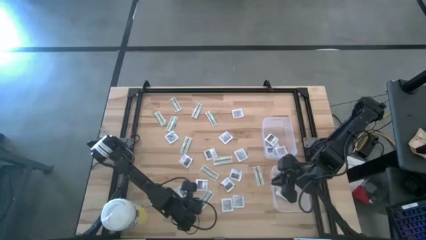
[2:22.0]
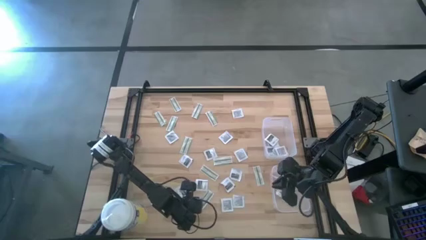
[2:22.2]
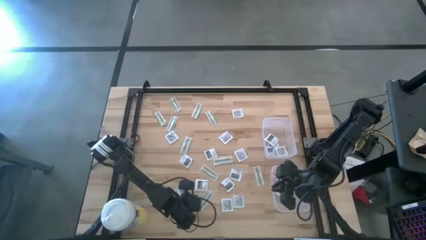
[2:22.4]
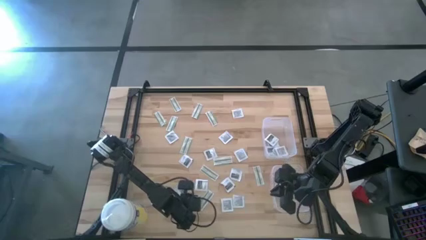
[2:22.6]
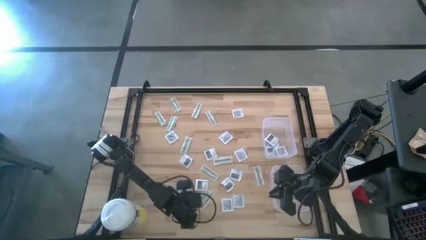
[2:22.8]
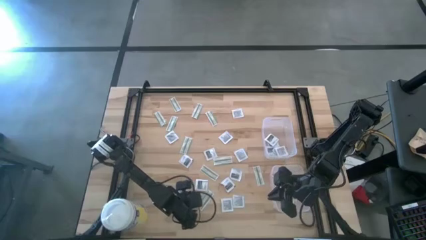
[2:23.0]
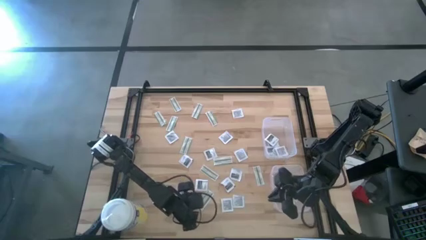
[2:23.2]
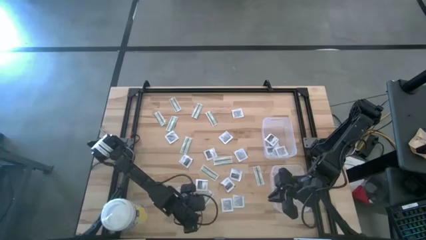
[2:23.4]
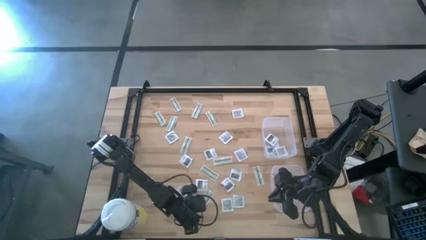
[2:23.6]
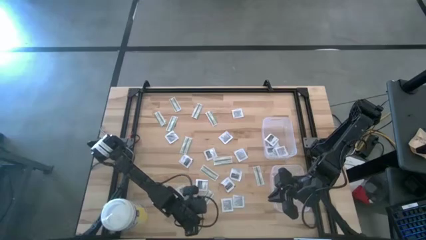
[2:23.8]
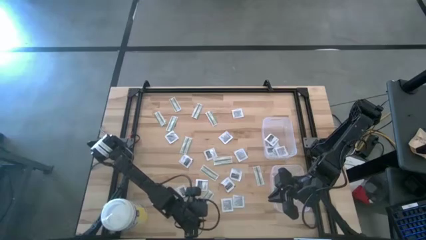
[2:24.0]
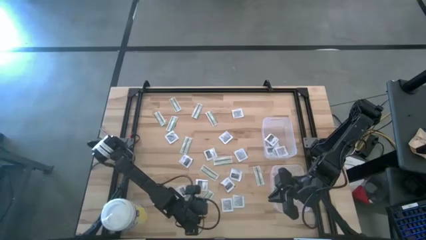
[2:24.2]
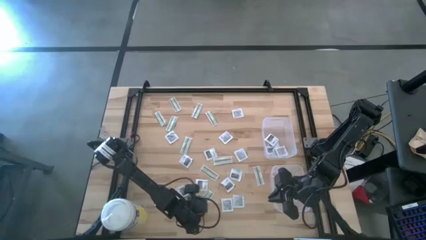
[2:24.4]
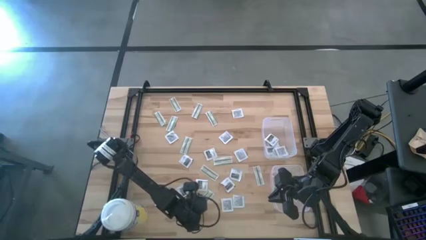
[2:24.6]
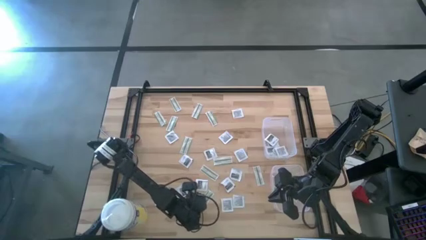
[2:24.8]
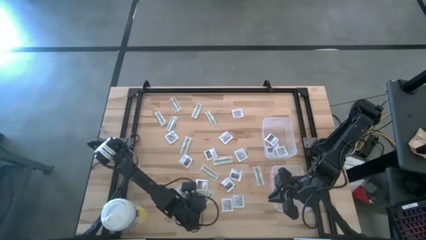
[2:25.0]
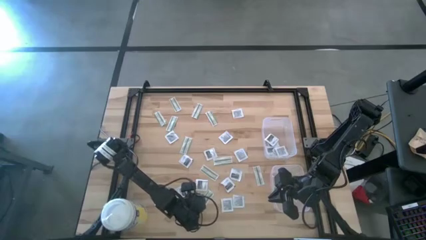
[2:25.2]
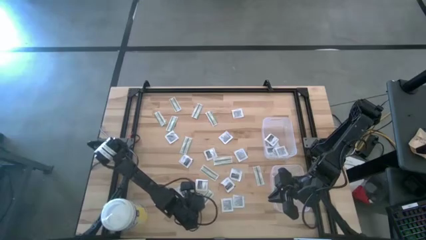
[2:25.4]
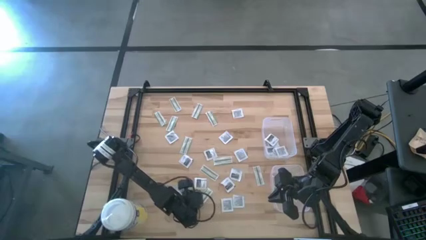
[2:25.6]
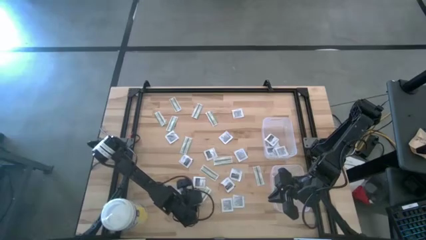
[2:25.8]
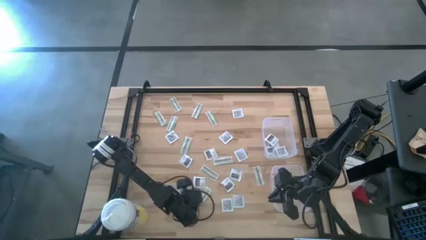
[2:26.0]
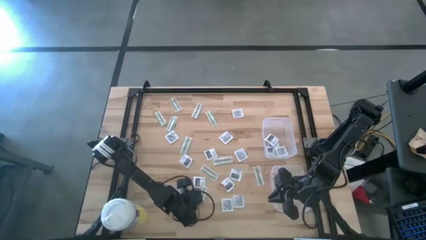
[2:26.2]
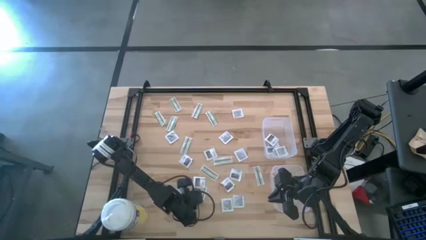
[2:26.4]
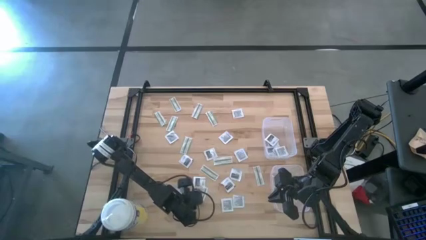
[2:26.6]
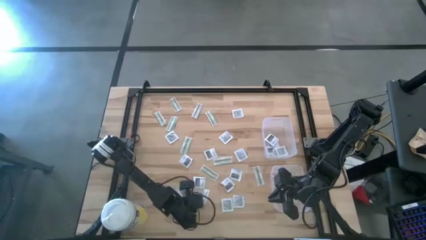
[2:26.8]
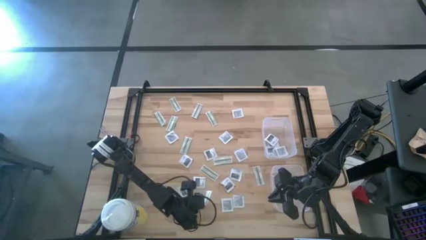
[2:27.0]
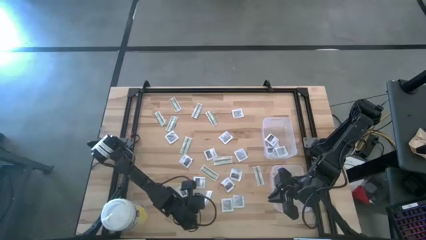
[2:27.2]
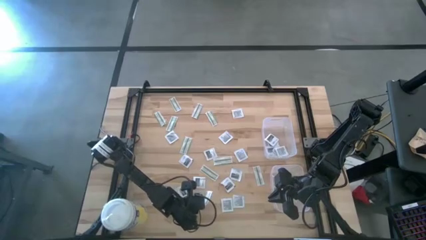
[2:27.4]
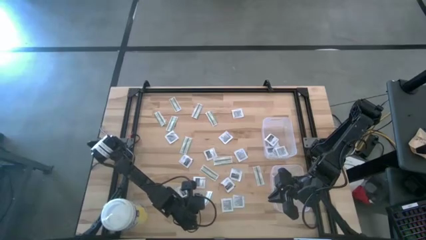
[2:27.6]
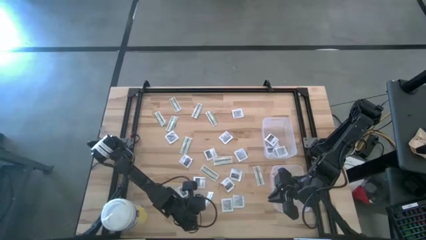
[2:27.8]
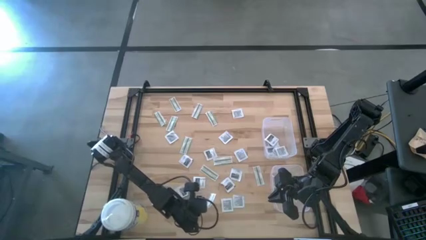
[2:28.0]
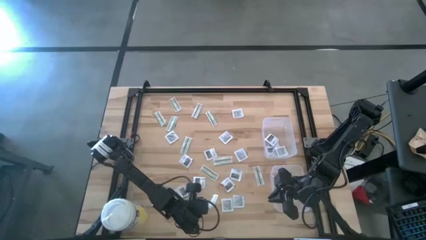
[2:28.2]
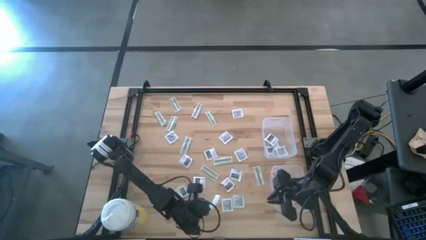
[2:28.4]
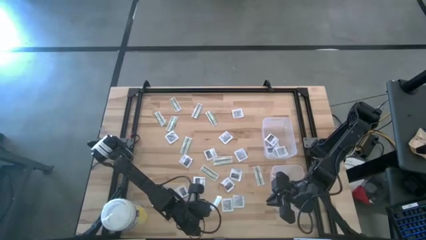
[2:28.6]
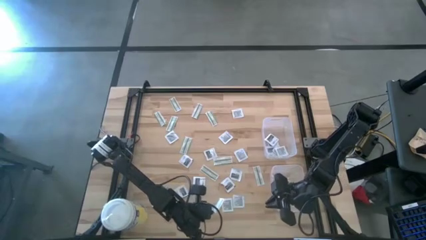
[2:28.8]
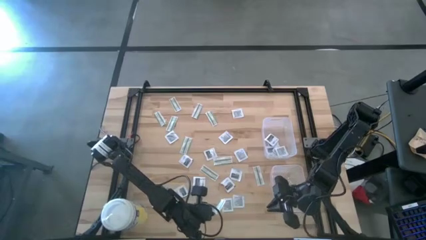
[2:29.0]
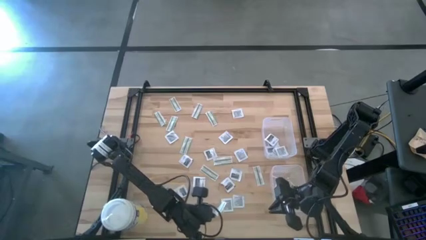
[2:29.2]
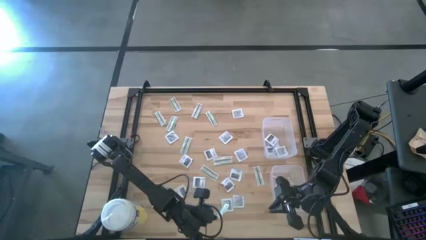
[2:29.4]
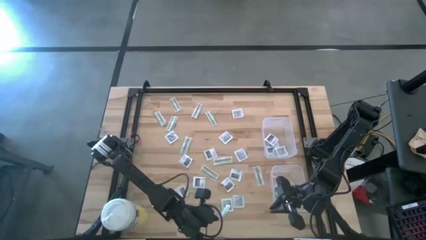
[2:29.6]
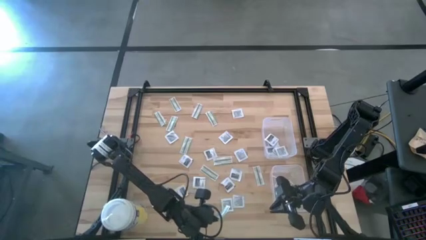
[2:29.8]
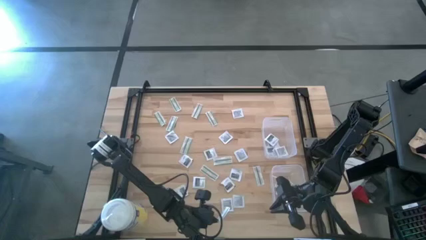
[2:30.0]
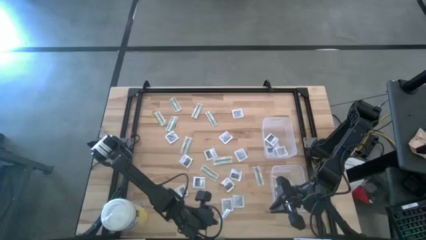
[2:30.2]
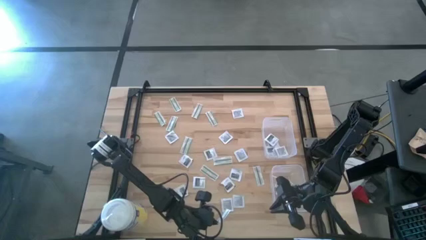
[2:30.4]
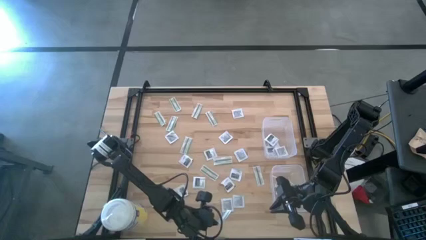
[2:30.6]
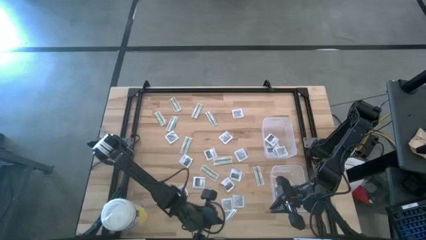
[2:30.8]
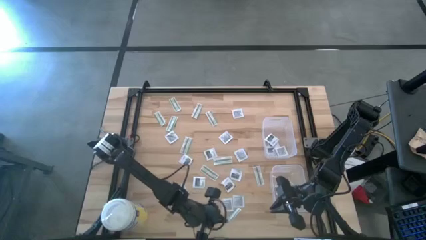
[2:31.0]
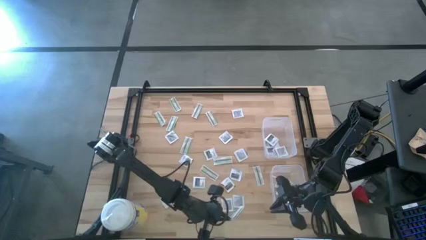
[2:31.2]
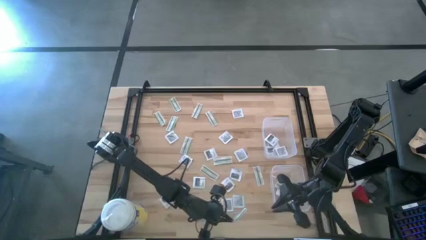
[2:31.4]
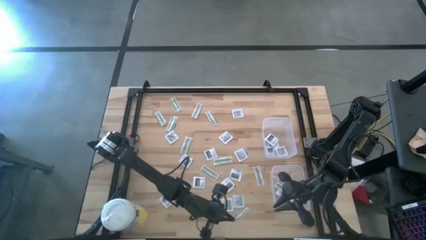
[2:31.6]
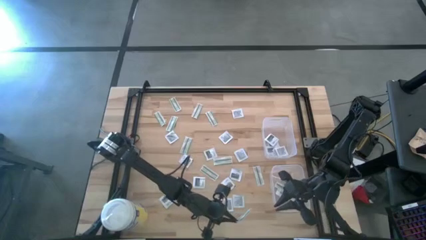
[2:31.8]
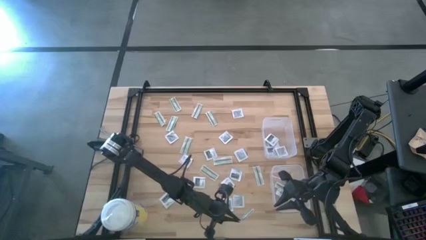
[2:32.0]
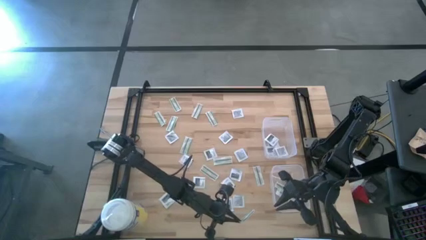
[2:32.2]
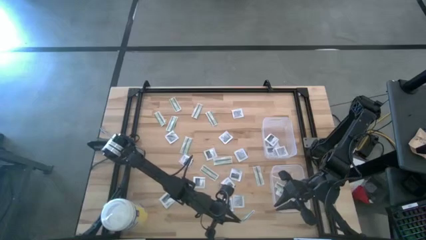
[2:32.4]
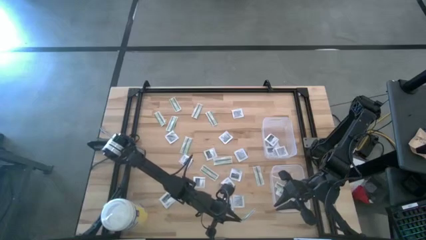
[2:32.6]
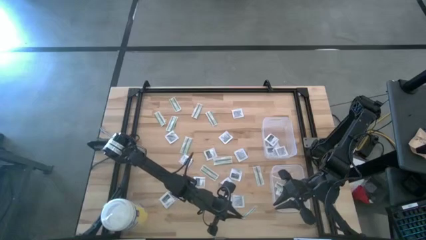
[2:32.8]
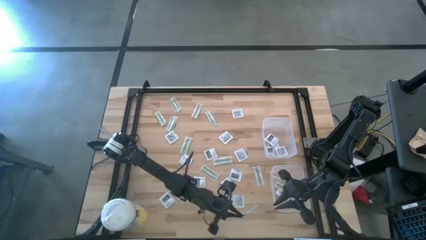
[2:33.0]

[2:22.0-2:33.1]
Task: Pick & Place First Aid Supplies
Put the bandage pack into the bottom bin

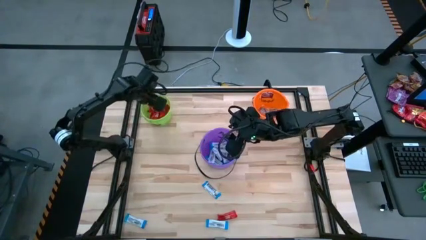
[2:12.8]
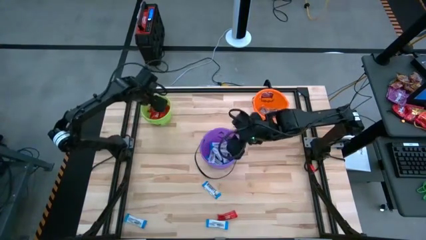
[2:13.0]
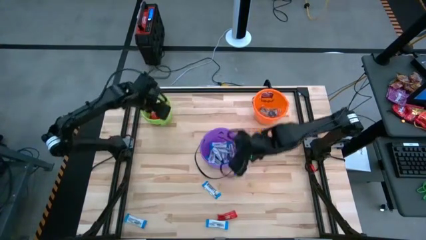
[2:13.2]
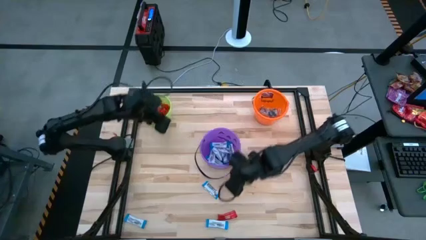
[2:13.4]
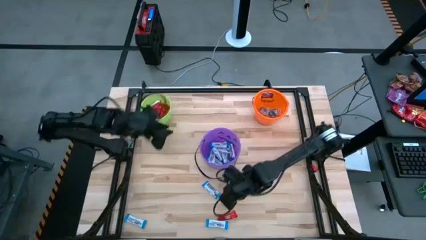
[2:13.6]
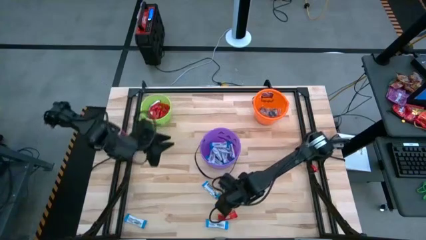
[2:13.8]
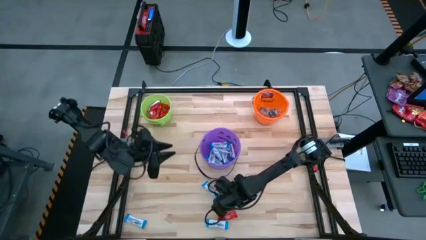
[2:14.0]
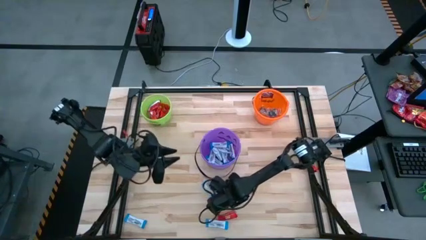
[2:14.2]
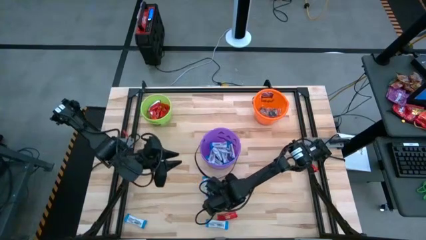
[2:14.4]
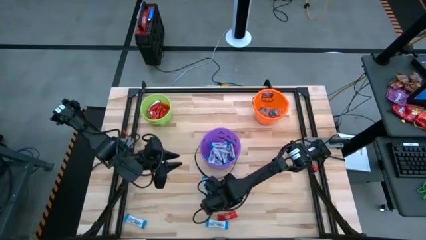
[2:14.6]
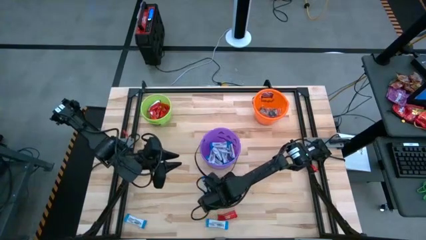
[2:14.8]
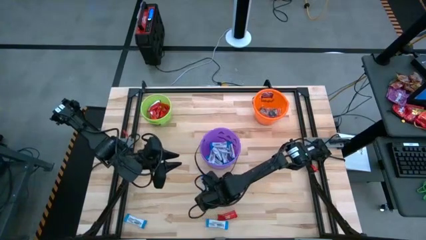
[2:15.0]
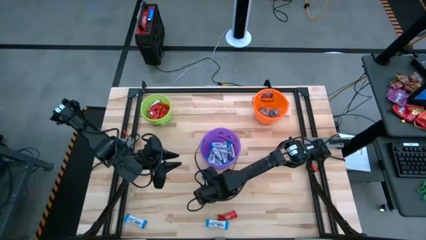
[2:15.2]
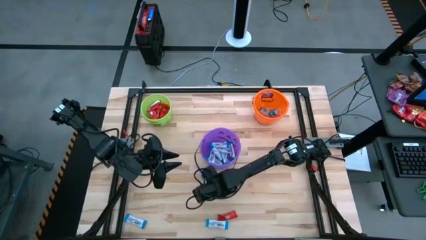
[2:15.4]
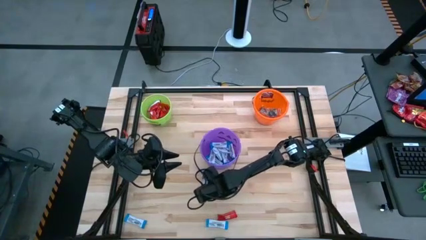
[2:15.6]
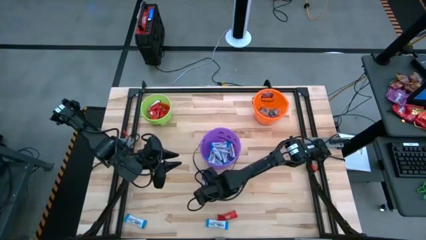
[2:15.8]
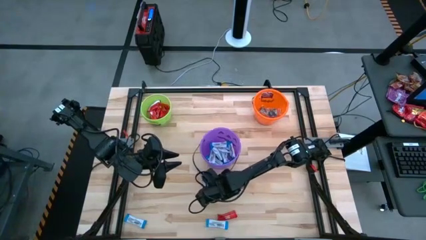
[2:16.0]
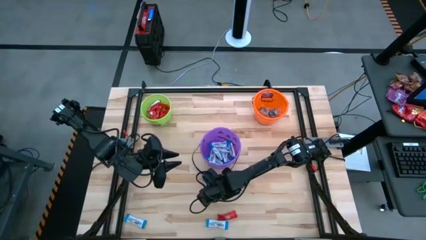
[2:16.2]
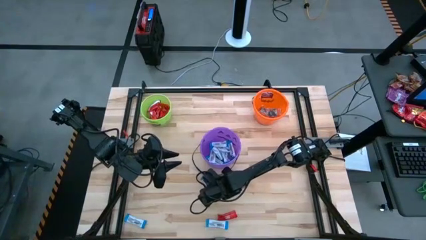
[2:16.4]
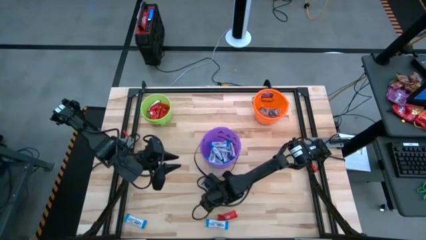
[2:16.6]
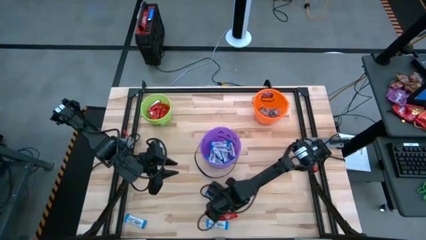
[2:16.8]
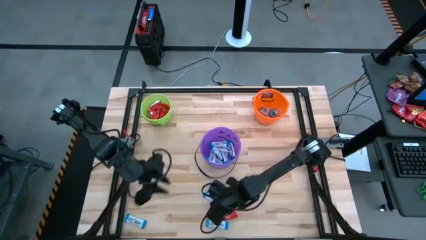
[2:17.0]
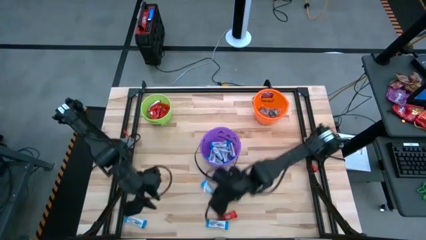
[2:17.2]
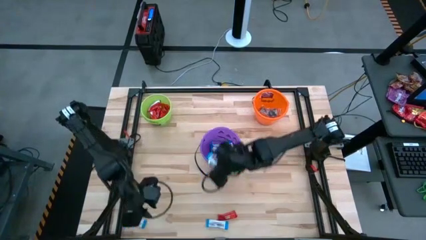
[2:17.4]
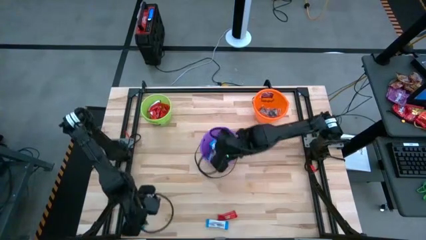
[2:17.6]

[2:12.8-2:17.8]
Task: Sort candy by brand, put in halloween buckets
Put the white chocolate into the purple bucket

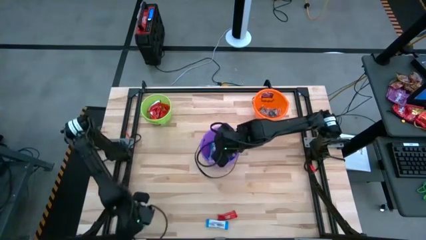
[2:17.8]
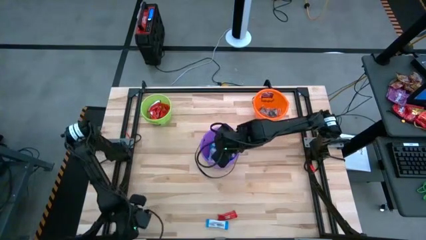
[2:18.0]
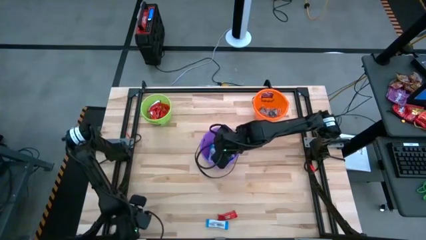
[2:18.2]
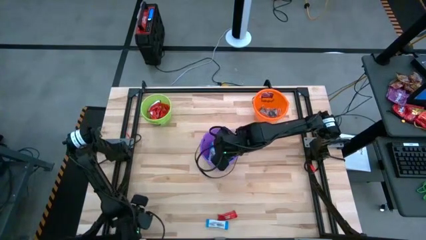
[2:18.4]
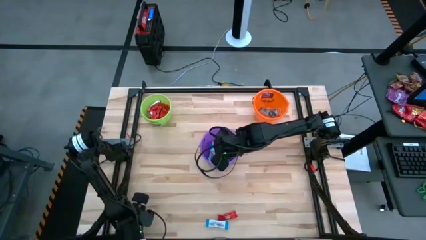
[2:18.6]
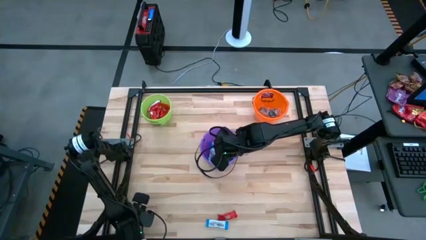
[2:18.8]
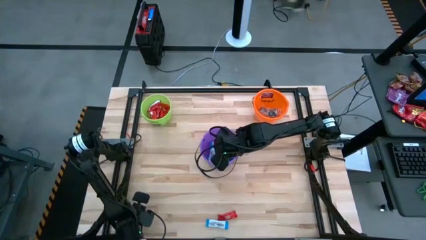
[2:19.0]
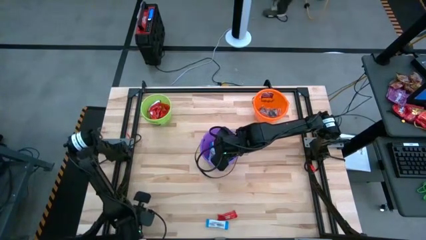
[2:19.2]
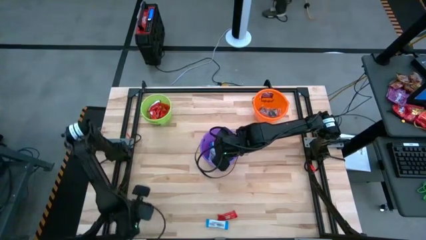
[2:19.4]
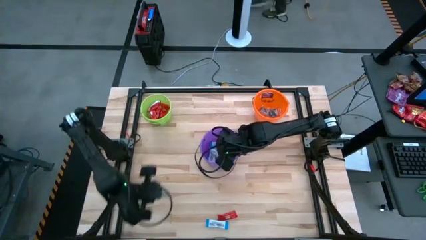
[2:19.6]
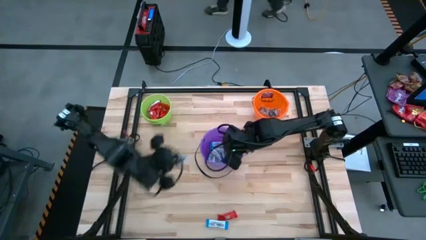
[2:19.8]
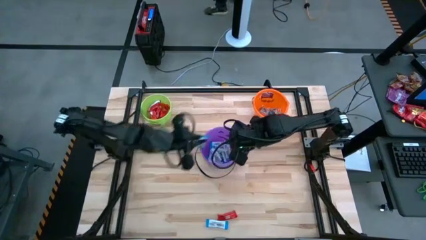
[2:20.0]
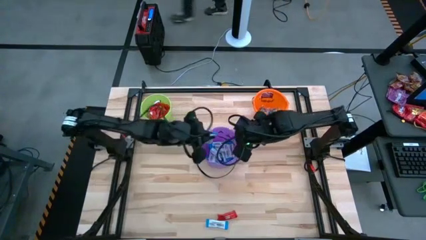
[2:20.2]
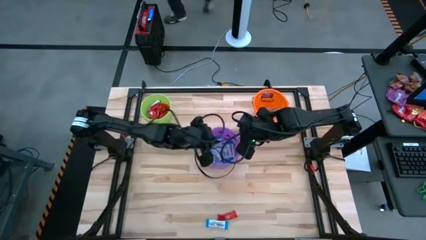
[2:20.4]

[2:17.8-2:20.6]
Put the white chocolate into the purple bucket
